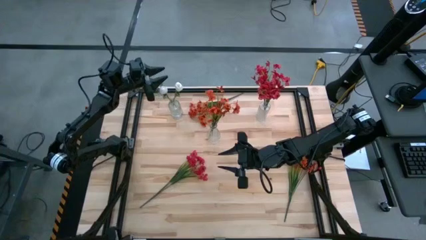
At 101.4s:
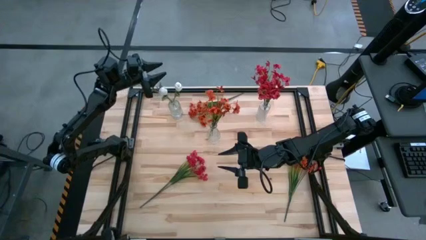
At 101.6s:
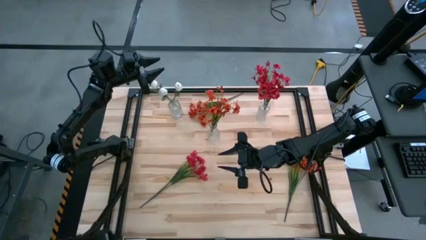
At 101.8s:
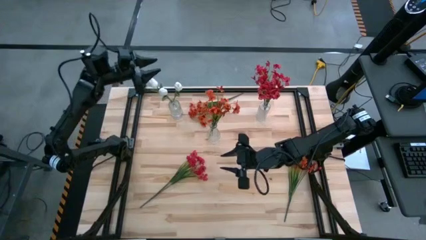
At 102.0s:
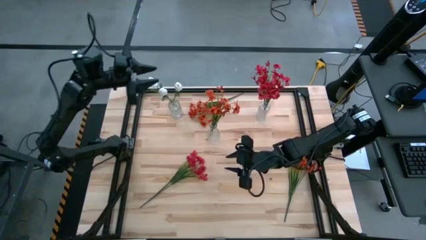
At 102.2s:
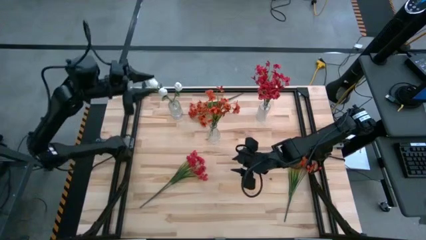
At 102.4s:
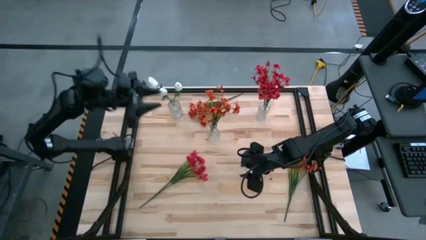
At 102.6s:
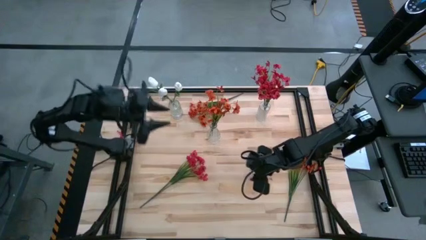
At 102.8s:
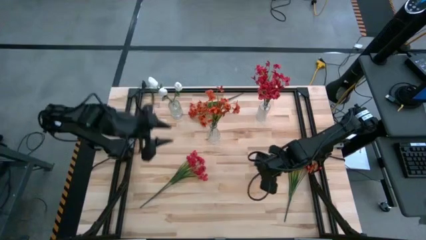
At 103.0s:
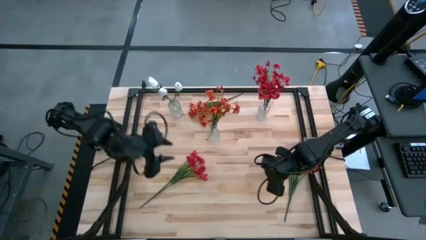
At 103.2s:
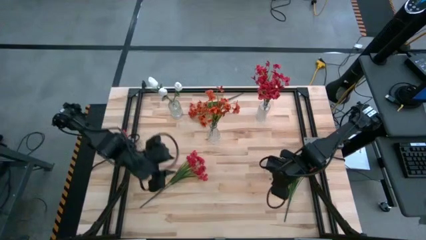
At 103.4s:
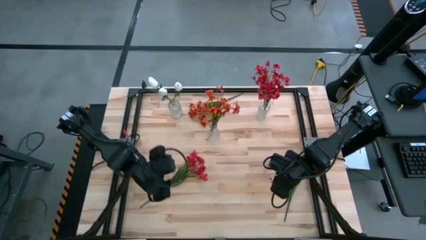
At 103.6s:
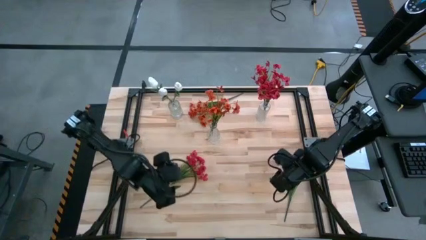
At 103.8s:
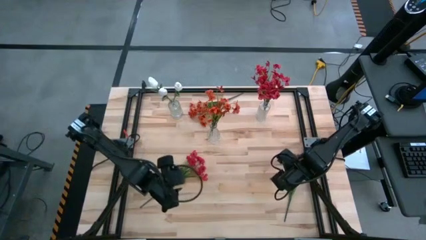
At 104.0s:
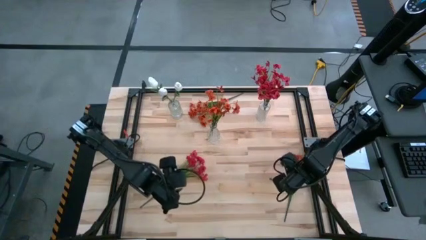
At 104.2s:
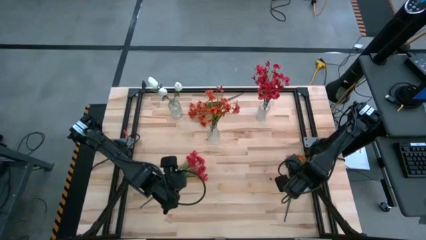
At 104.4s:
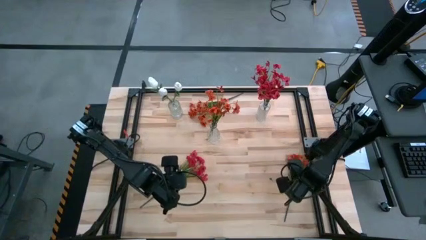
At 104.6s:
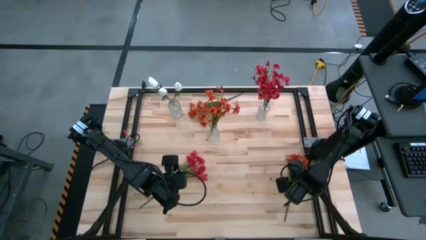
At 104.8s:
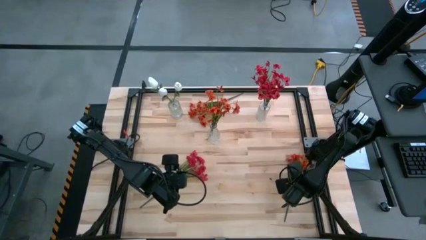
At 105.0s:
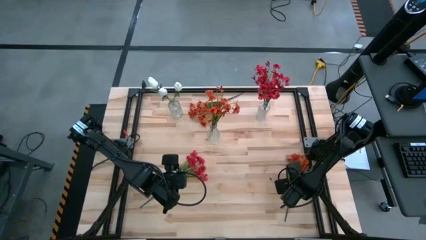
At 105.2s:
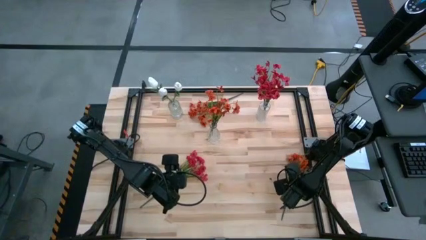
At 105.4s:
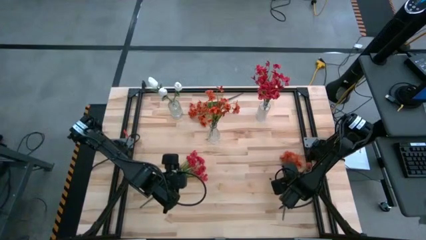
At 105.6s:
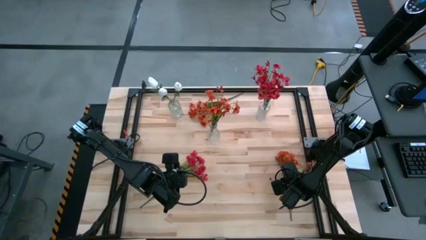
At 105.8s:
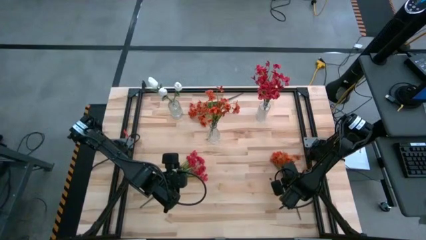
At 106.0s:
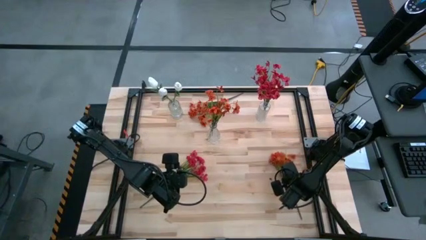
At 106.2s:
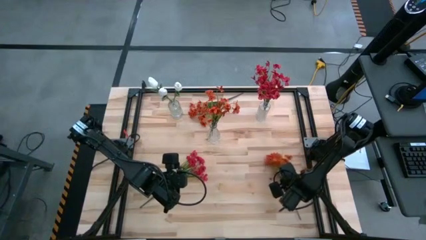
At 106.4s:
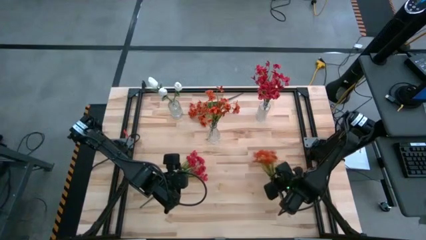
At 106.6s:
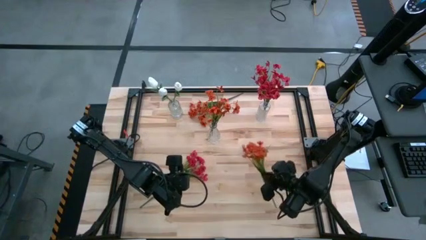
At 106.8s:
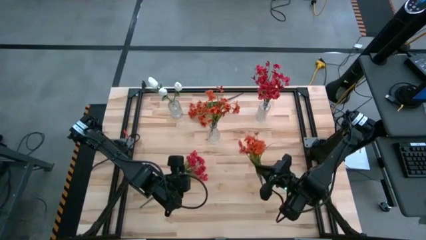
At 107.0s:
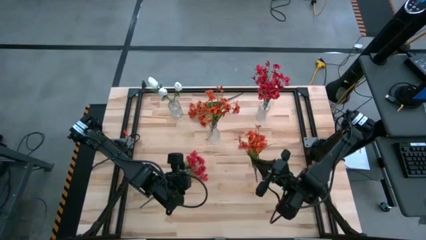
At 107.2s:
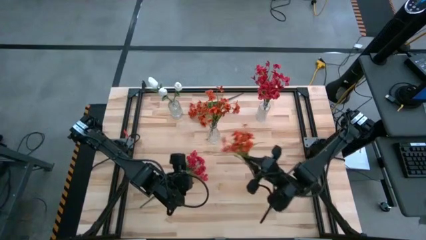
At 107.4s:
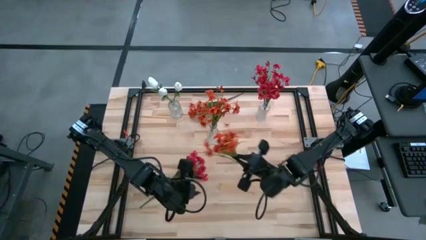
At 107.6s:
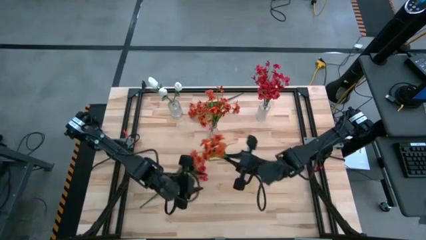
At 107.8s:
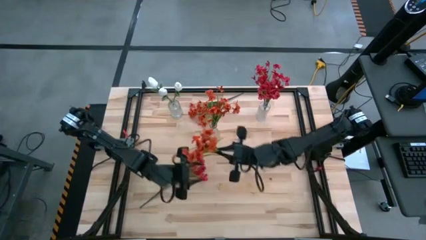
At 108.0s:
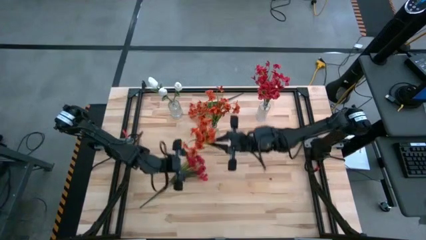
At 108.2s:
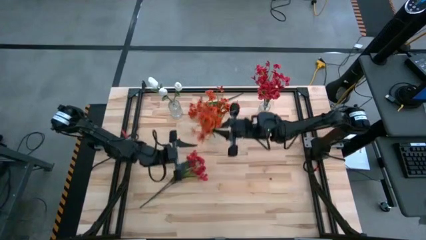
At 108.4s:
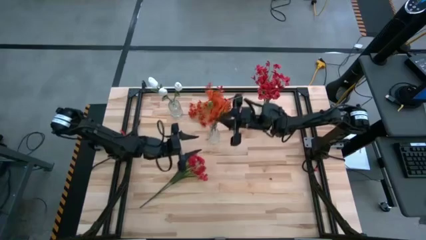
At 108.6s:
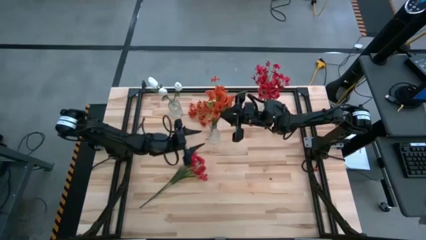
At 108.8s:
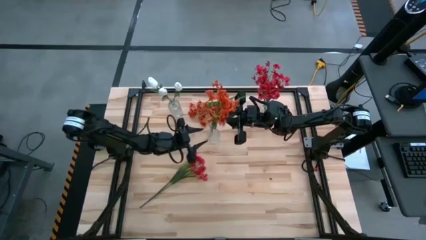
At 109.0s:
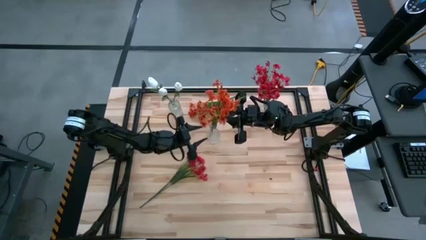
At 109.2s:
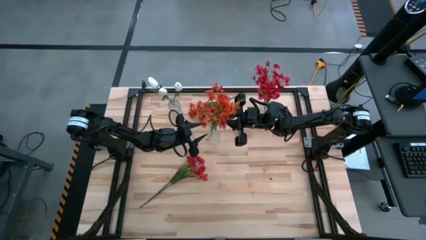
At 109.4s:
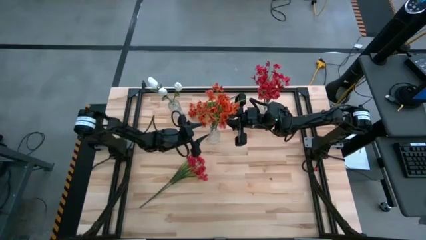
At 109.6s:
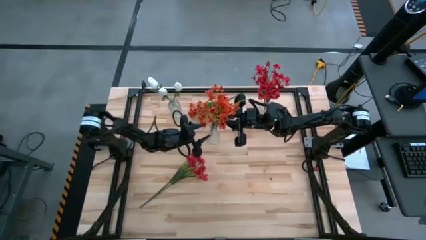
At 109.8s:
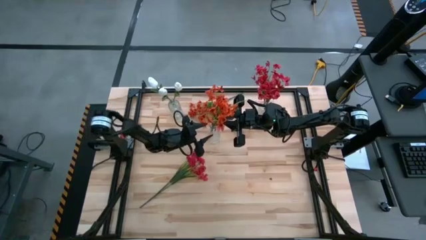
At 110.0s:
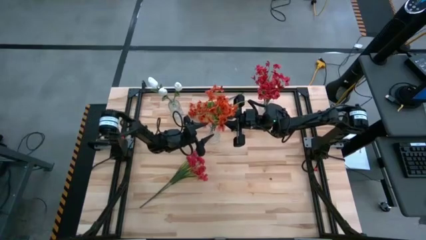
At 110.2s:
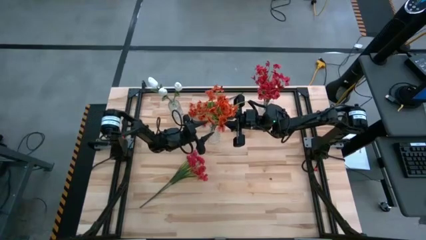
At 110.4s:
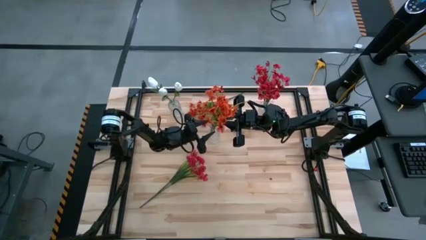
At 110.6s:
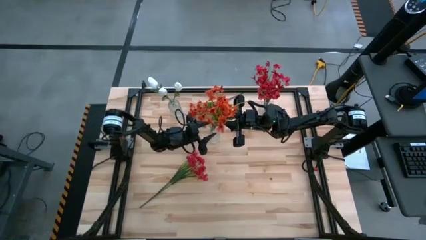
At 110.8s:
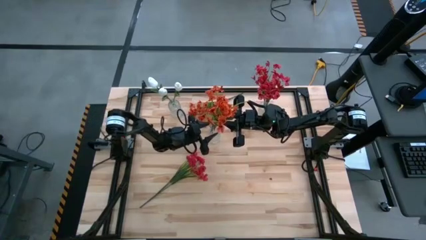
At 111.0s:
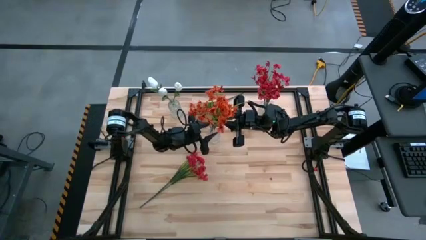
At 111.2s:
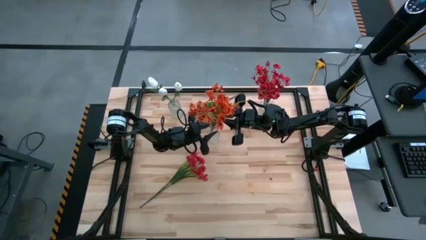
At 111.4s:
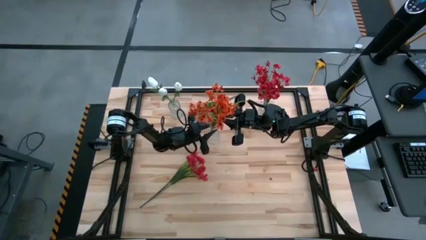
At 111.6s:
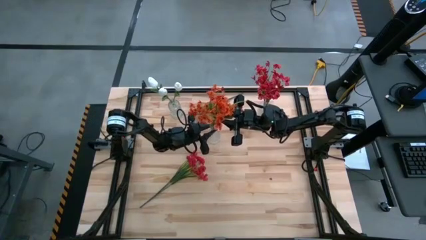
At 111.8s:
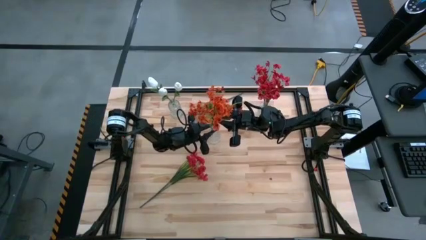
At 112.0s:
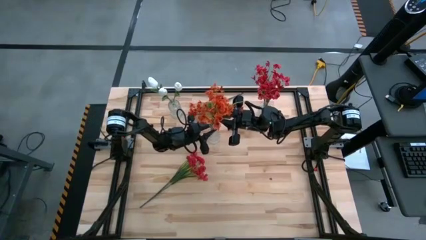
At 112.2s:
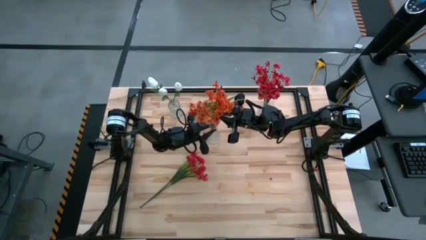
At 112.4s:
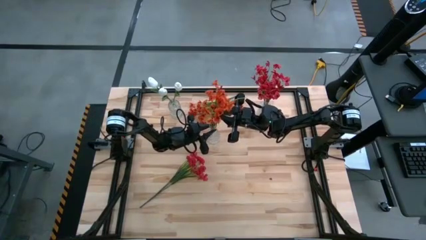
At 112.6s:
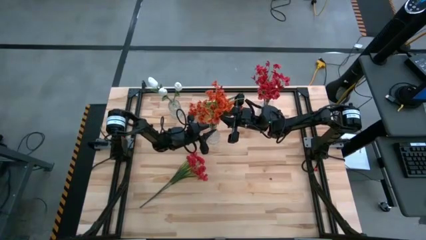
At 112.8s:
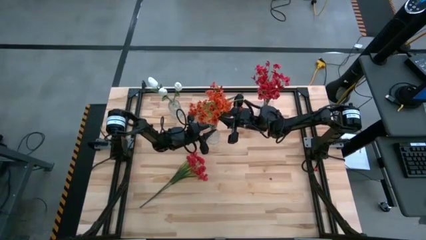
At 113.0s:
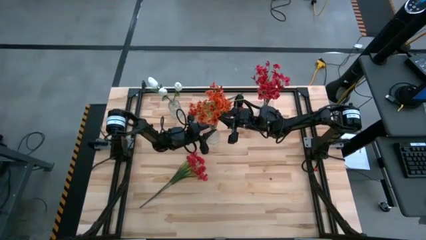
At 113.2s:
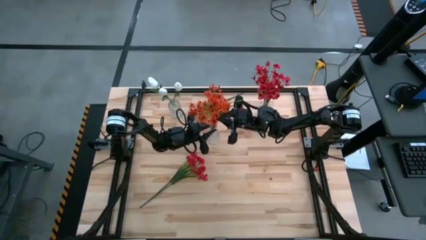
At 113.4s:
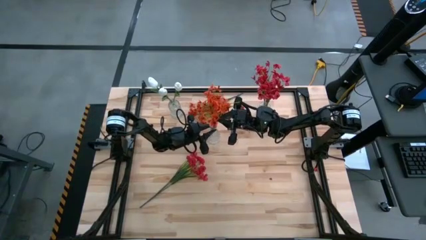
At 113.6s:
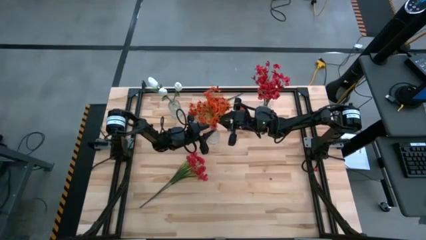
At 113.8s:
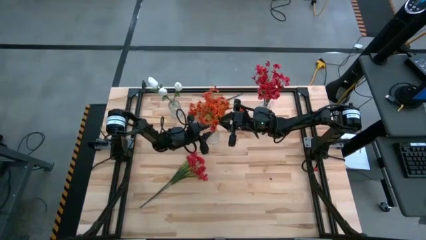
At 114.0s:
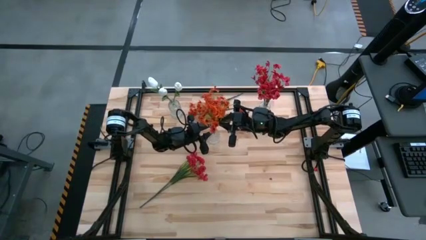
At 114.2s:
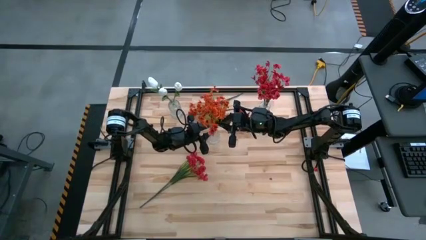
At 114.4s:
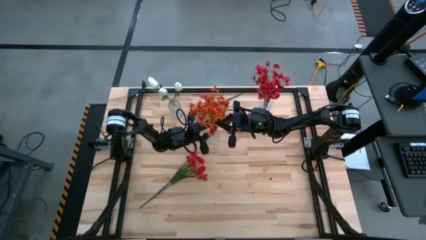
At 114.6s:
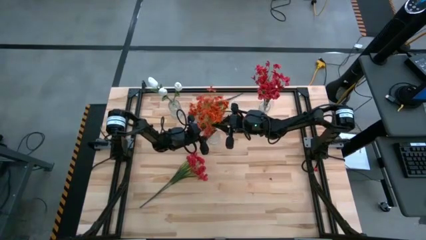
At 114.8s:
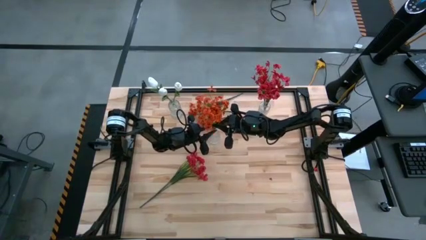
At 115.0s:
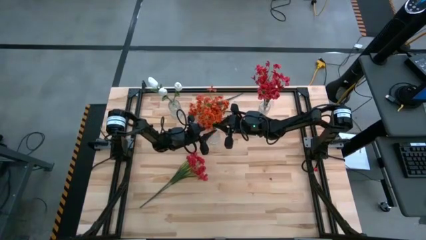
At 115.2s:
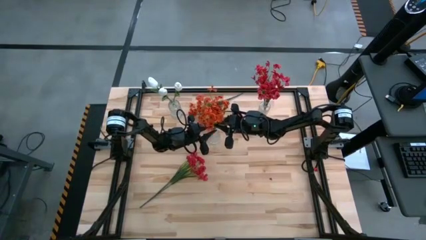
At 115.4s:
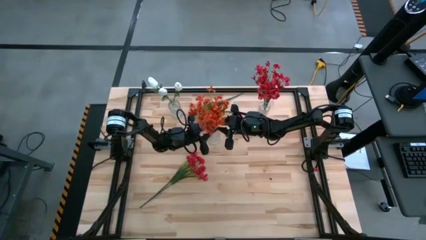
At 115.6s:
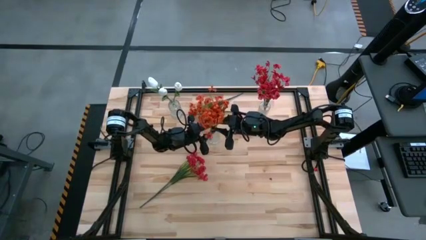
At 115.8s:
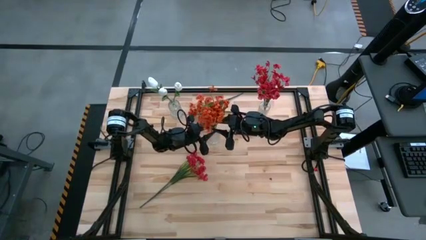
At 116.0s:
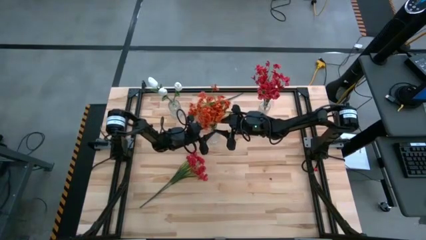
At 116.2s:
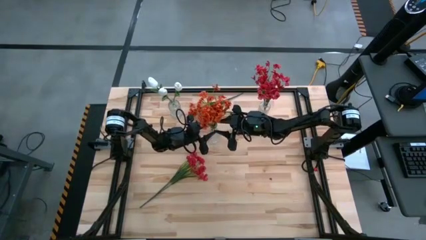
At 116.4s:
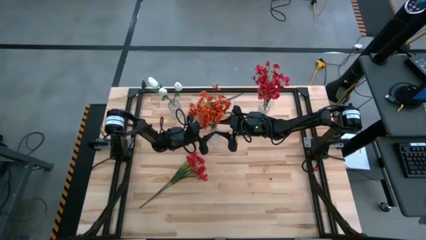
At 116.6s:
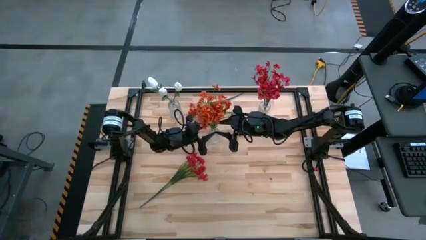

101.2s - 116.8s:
Task: Sort flowers into vase by color
Put the bottom orange flowers into the bottom transparent vase

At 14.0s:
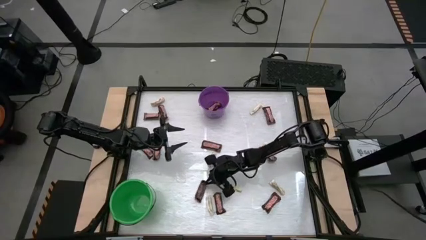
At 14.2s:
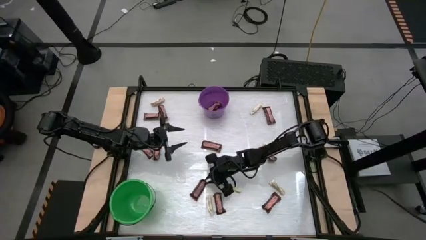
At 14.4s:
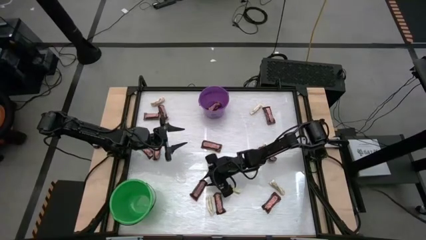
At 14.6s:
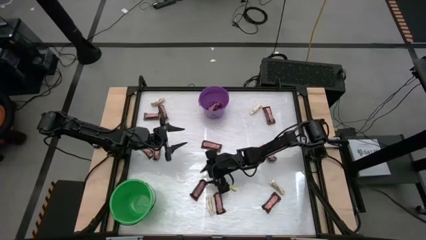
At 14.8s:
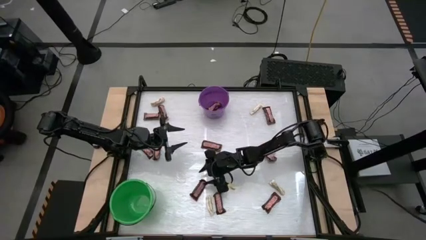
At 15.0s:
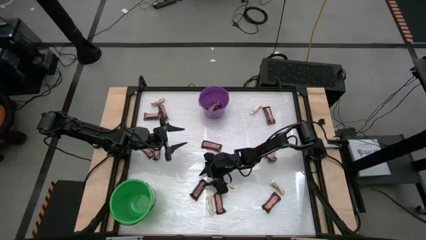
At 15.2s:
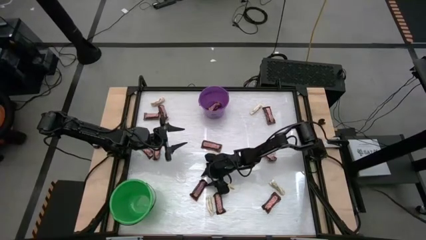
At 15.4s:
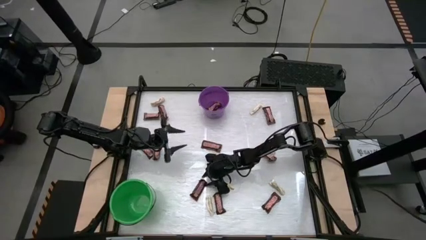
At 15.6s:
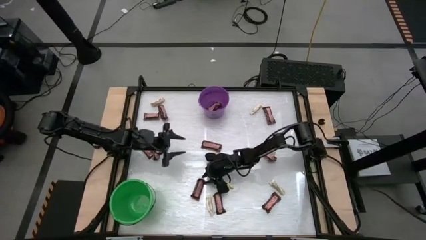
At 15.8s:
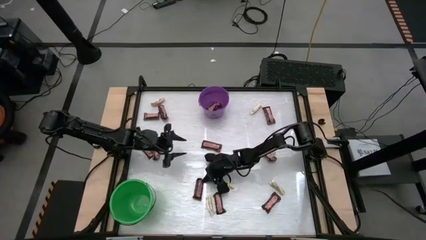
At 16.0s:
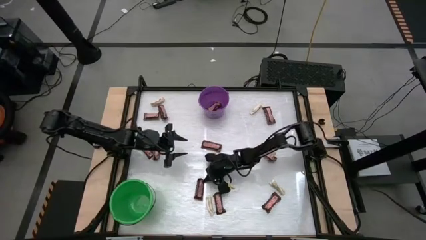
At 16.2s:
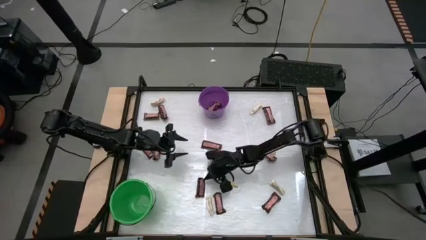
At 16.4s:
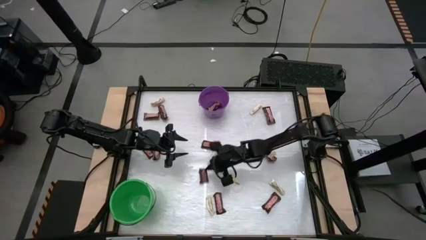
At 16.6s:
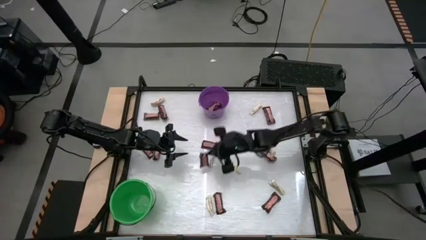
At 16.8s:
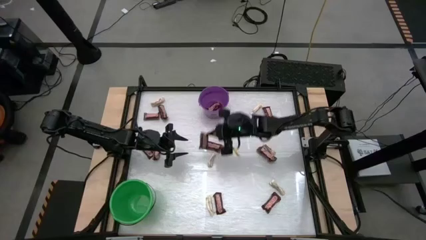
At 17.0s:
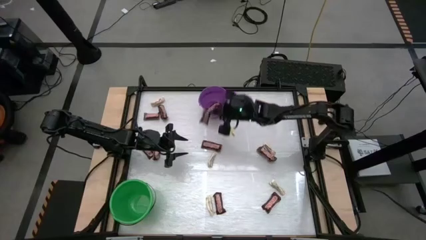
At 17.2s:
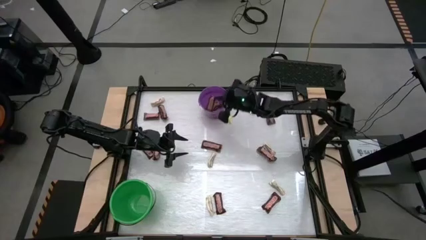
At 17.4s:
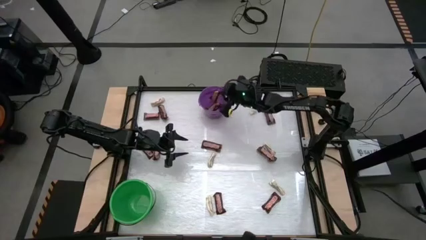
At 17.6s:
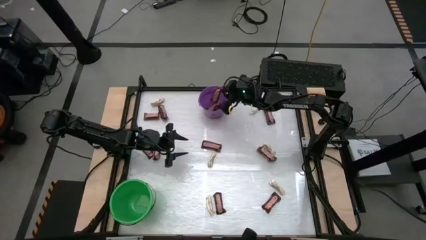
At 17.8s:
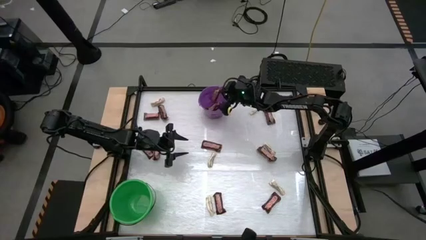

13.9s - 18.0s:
Task: Sort candy by brand, put in halloween buckets
Put the brown chocolate into the purple bucket
